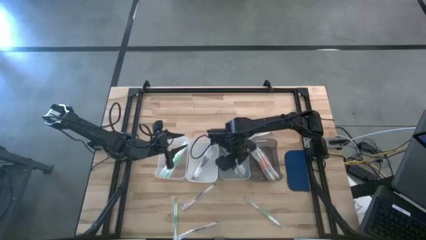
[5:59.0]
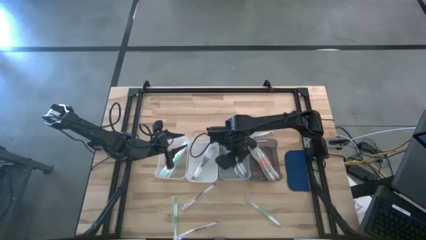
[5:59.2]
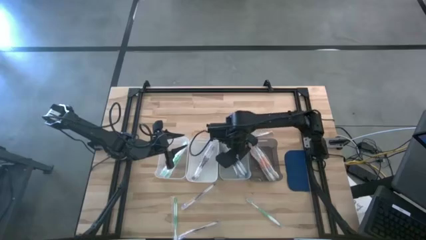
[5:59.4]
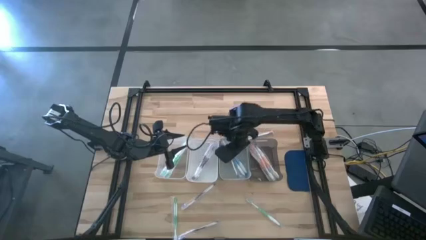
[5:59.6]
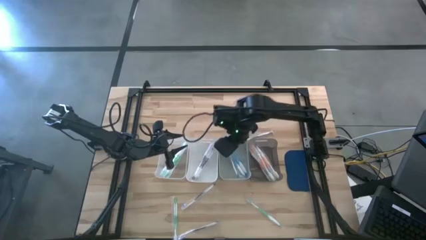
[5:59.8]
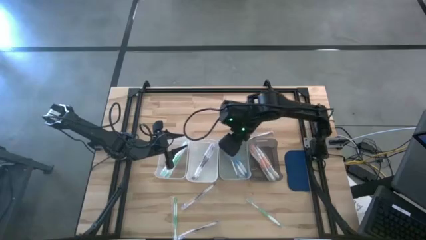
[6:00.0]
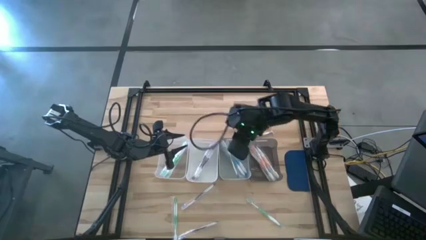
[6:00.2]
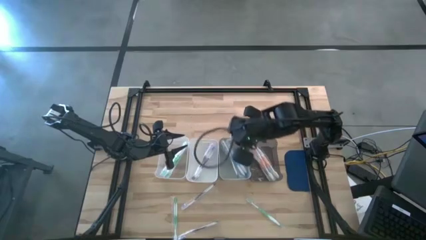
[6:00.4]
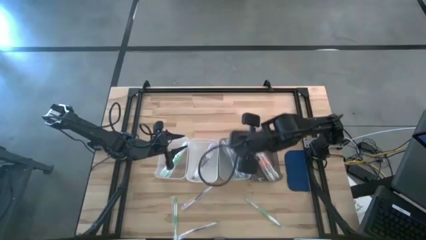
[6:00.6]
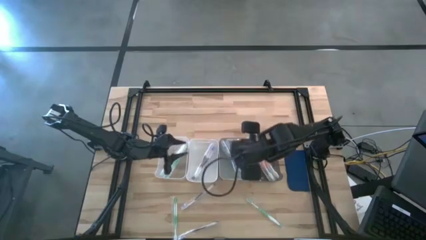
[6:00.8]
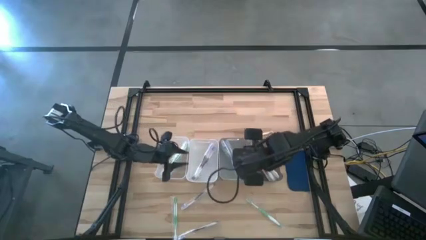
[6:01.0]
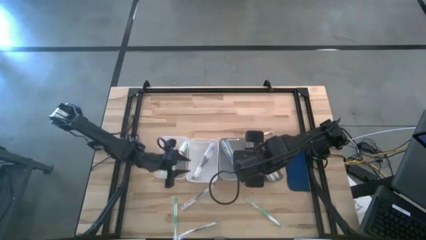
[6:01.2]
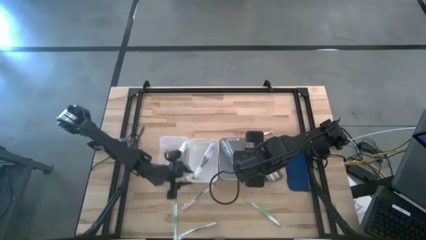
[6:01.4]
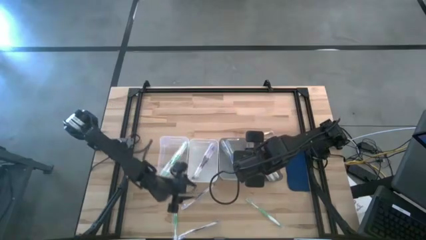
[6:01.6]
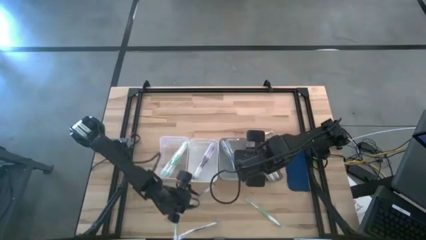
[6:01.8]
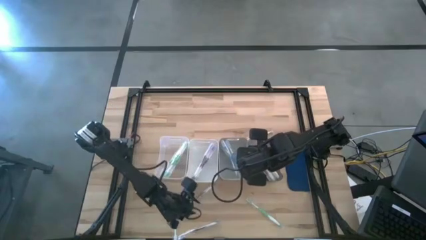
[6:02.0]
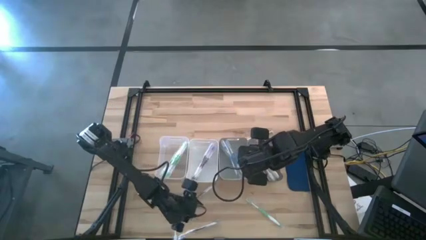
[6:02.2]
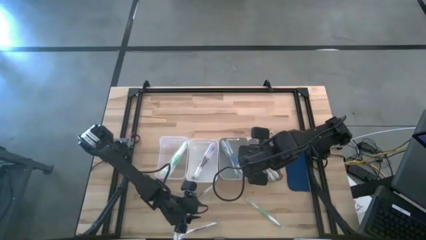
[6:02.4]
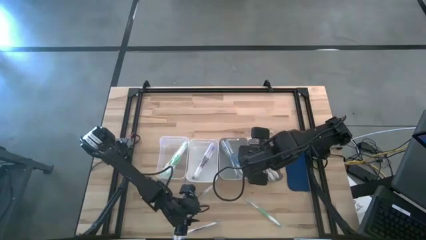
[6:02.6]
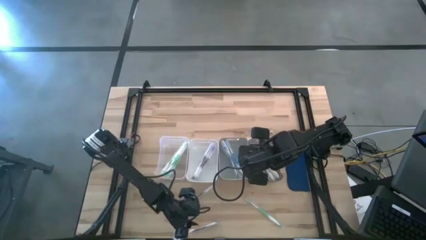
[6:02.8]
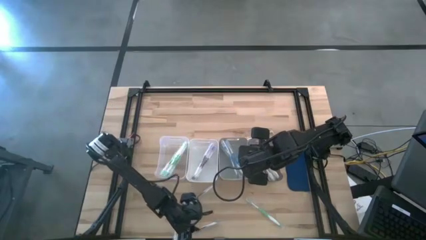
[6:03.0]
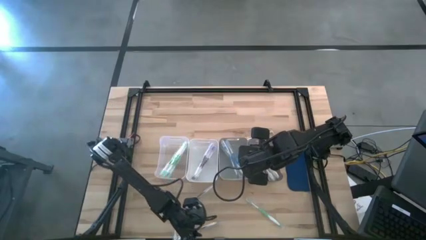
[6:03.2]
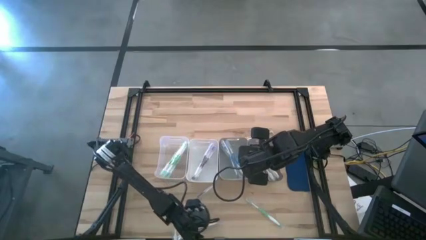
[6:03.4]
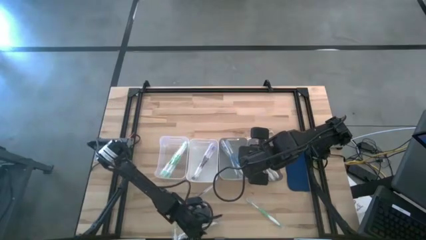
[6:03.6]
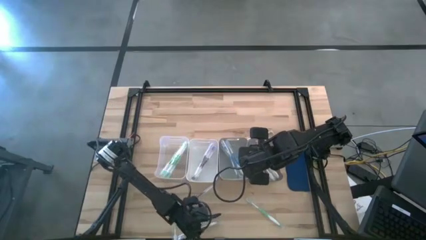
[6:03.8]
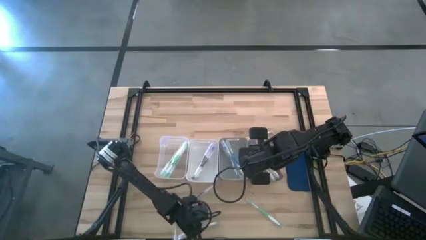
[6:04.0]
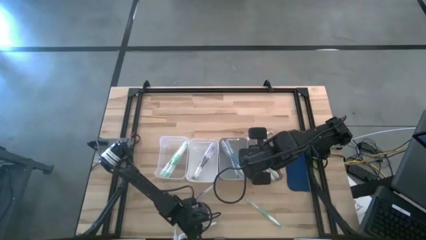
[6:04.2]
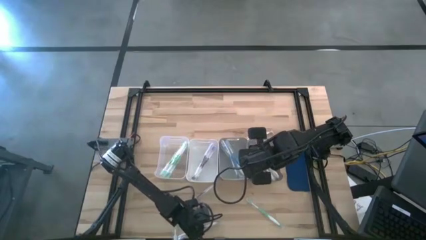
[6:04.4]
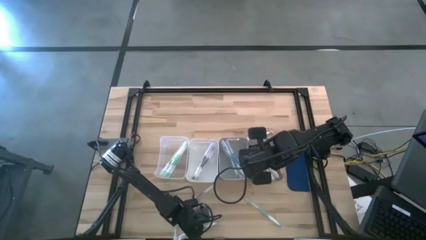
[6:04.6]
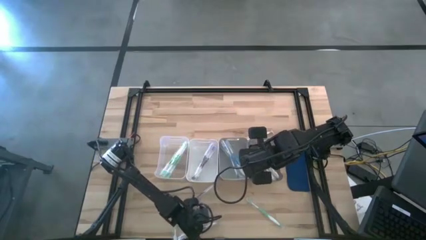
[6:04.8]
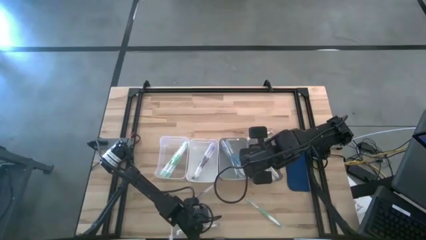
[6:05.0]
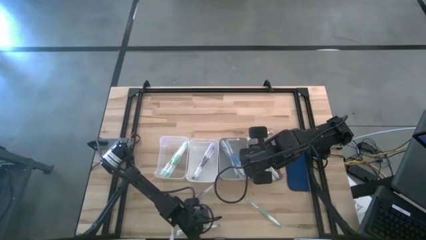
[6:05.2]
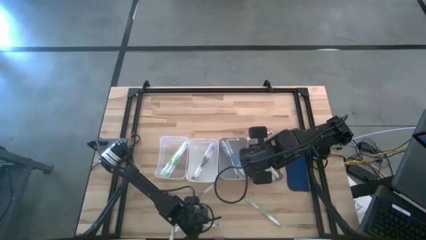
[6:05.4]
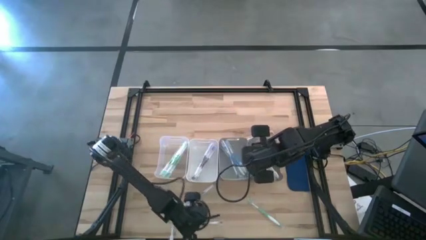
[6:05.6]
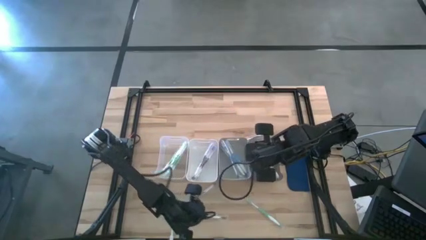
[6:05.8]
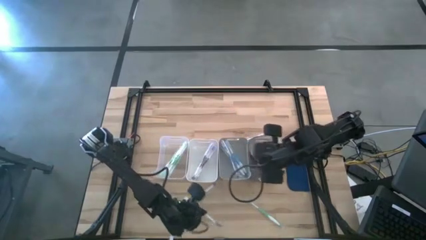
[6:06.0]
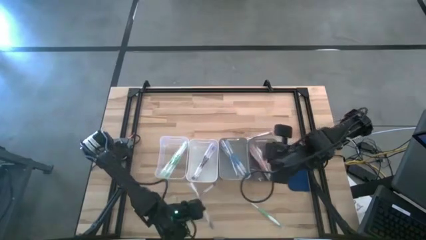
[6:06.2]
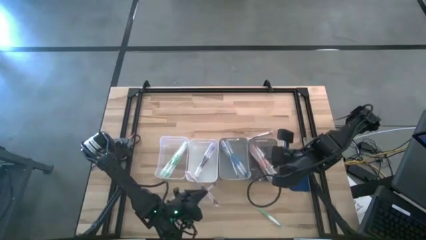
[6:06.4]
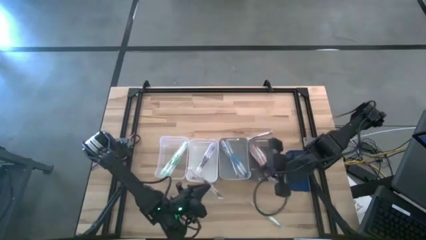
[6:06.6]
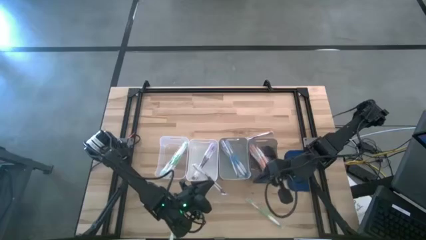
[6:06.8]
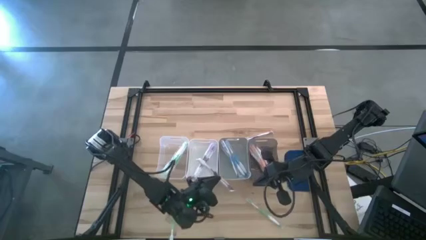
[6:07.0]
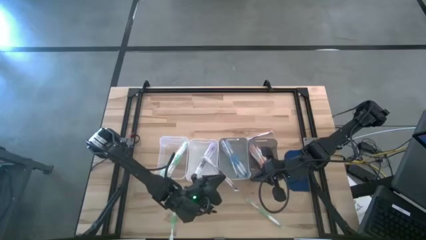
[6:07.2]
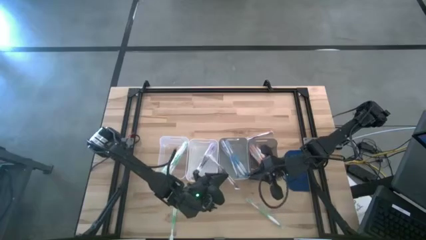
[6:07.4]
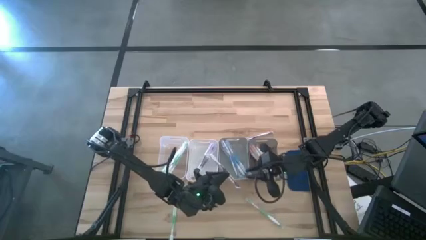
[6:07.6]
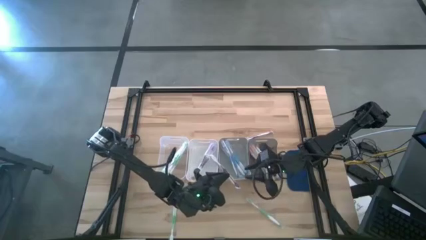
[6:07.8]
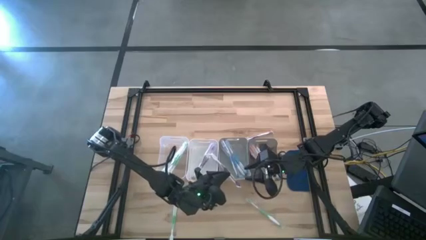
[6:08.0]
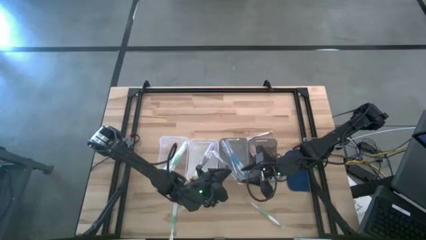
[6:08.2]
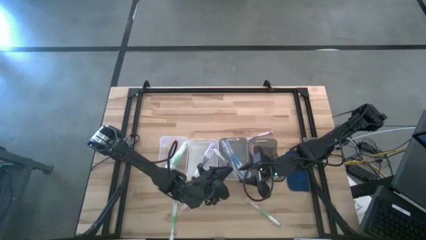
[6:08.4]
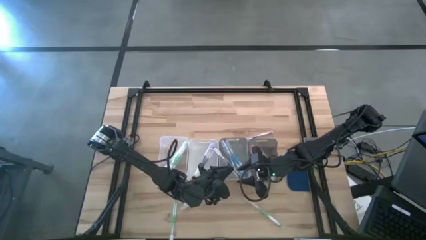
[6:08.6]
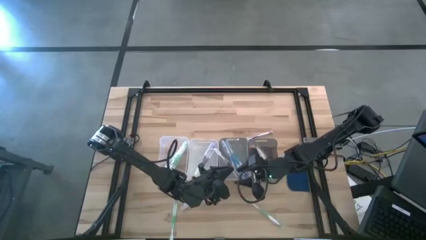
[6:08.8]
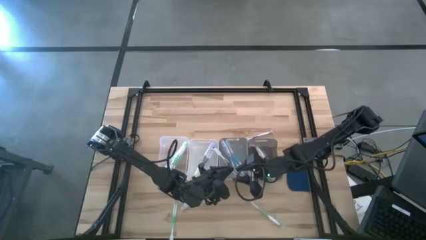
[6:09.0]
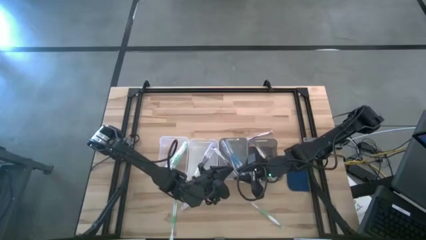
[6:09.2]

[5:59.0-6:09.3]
Task: Pick & Place Toothbrushes
Put the purple toothbrush into the white bin
